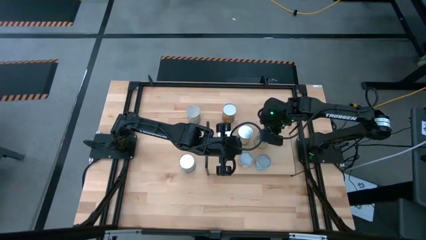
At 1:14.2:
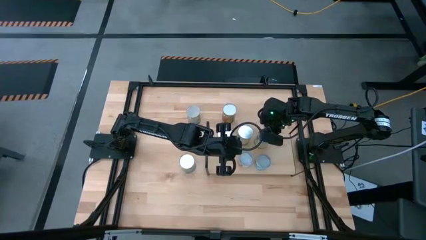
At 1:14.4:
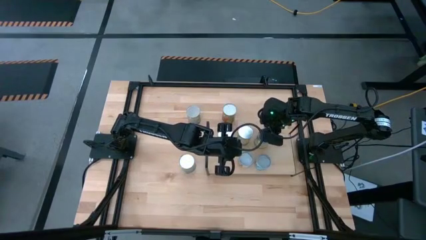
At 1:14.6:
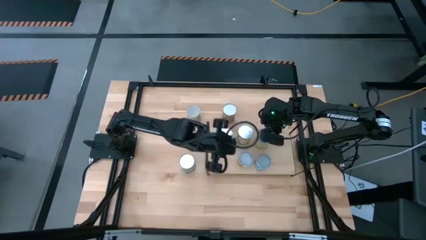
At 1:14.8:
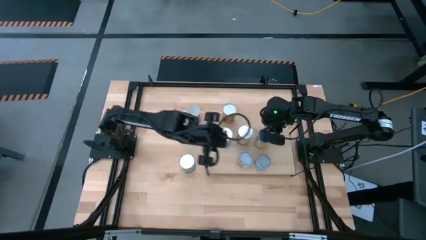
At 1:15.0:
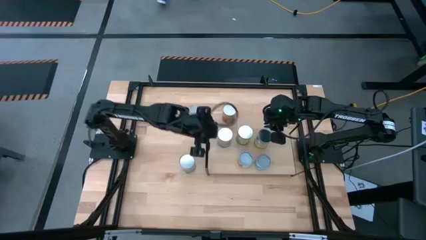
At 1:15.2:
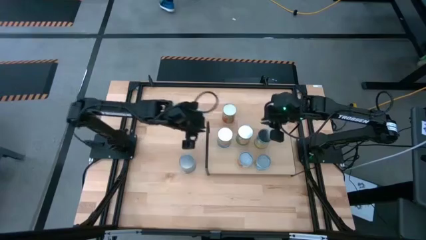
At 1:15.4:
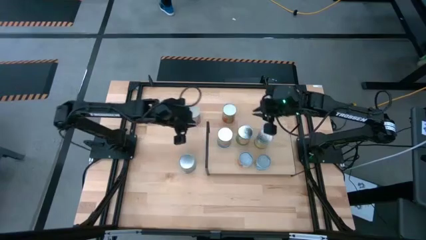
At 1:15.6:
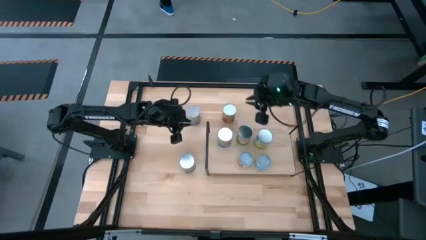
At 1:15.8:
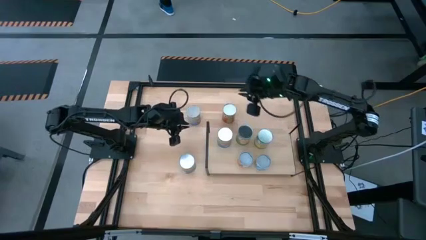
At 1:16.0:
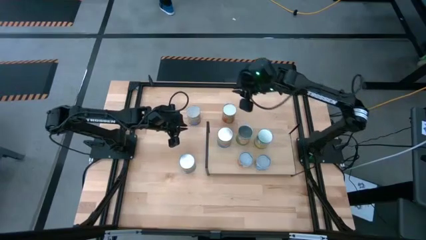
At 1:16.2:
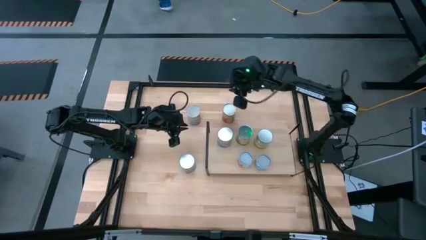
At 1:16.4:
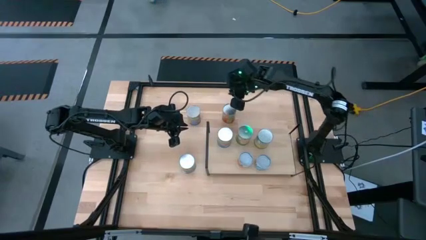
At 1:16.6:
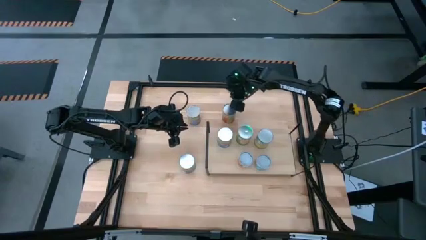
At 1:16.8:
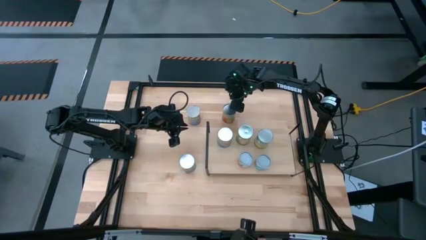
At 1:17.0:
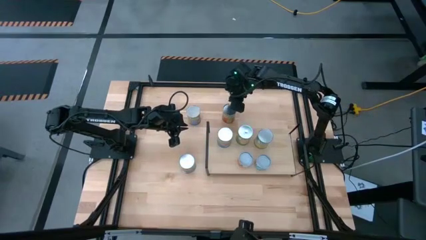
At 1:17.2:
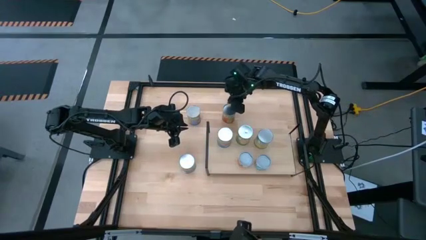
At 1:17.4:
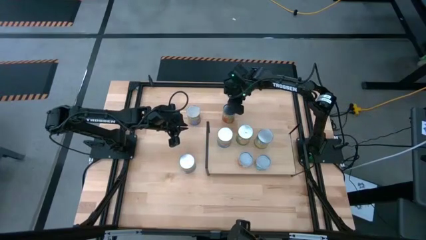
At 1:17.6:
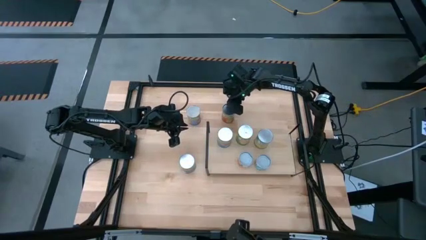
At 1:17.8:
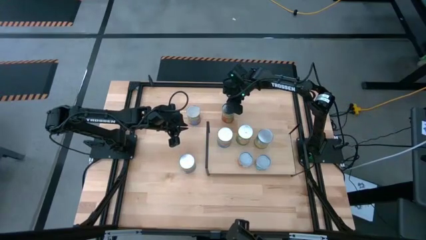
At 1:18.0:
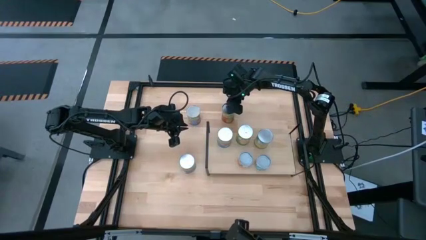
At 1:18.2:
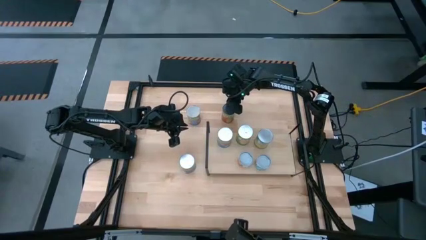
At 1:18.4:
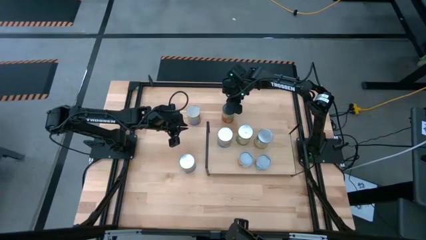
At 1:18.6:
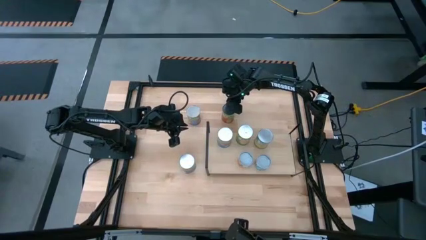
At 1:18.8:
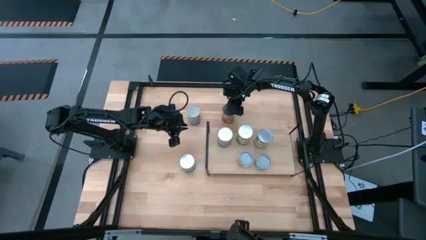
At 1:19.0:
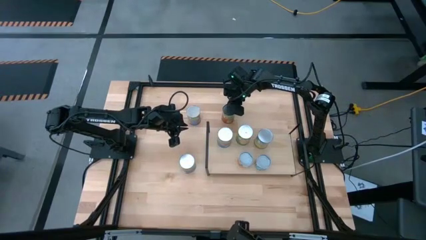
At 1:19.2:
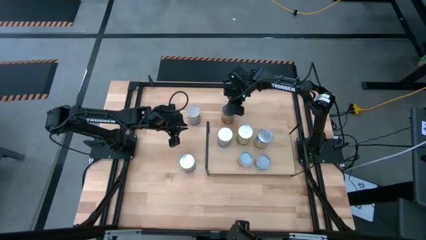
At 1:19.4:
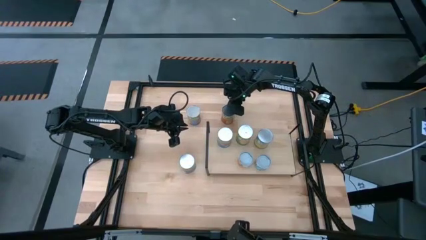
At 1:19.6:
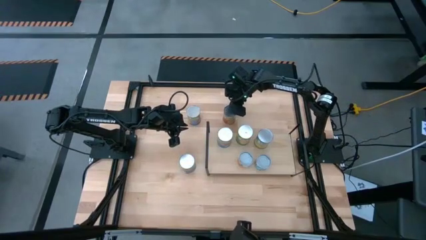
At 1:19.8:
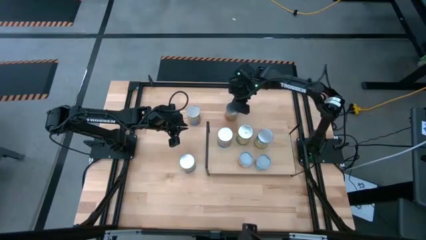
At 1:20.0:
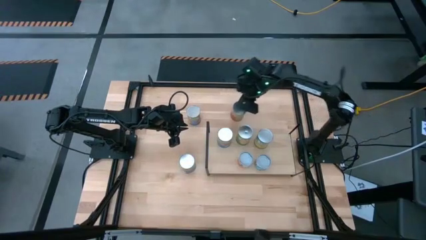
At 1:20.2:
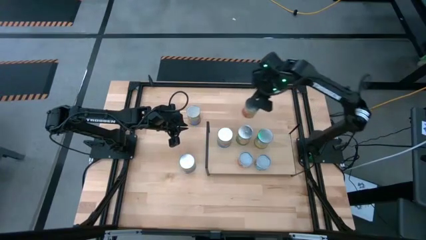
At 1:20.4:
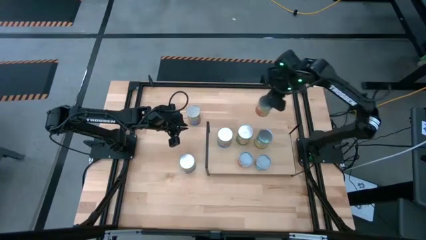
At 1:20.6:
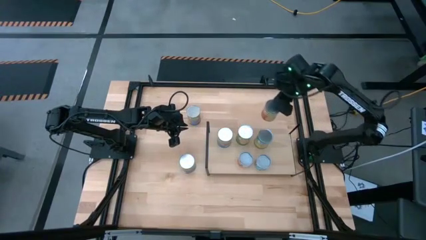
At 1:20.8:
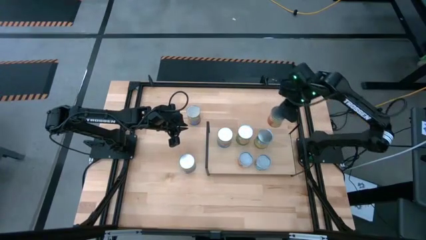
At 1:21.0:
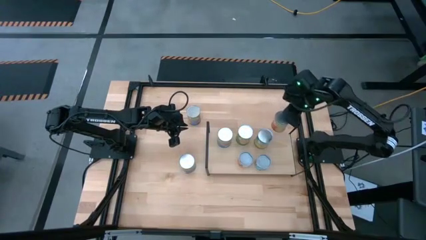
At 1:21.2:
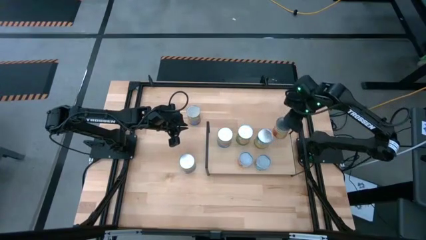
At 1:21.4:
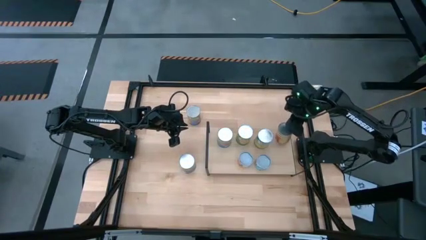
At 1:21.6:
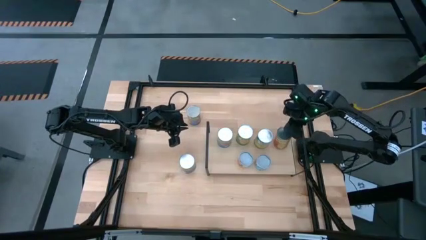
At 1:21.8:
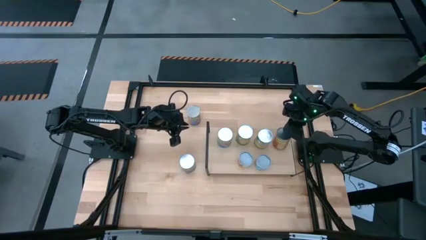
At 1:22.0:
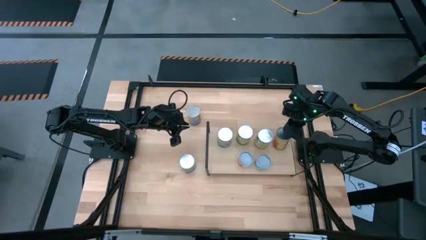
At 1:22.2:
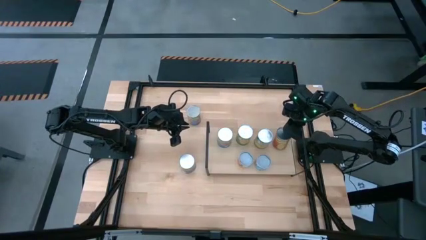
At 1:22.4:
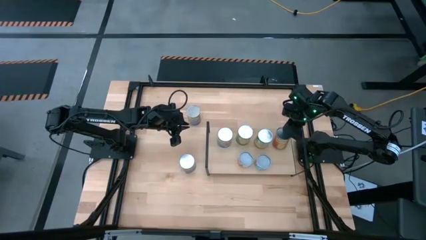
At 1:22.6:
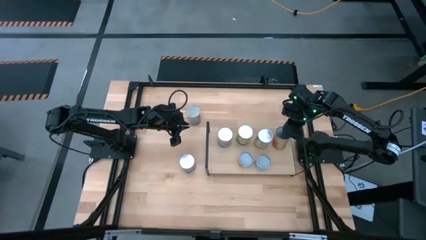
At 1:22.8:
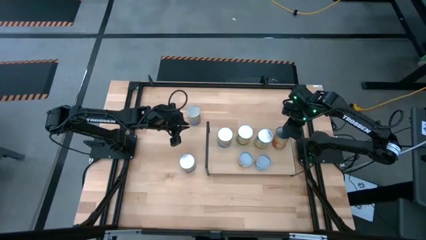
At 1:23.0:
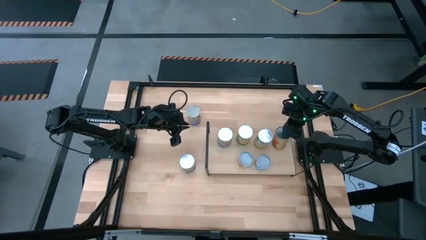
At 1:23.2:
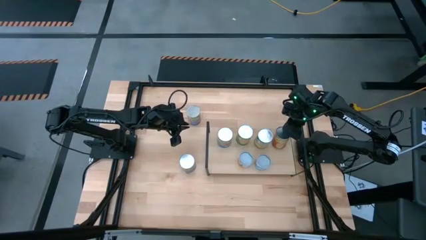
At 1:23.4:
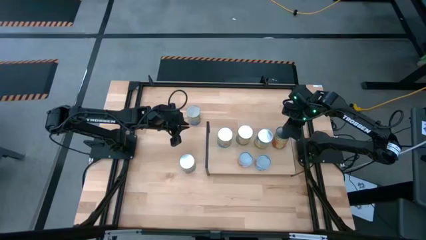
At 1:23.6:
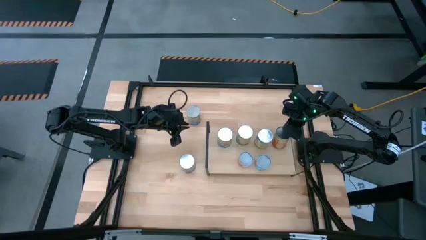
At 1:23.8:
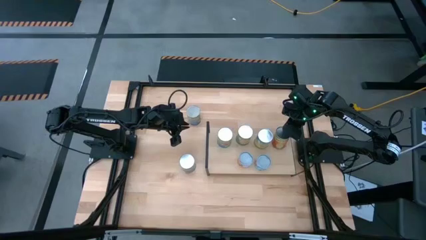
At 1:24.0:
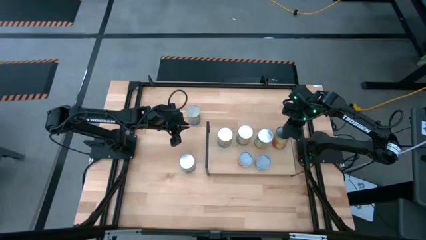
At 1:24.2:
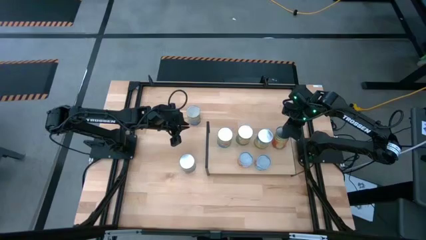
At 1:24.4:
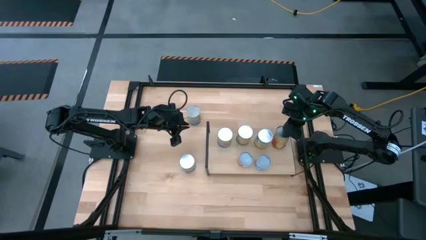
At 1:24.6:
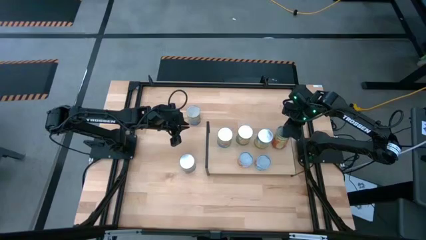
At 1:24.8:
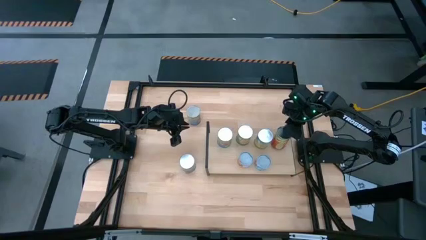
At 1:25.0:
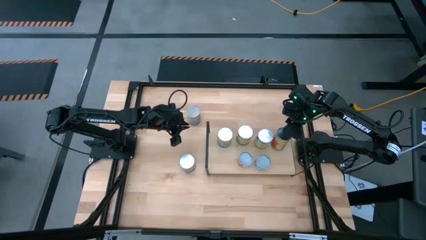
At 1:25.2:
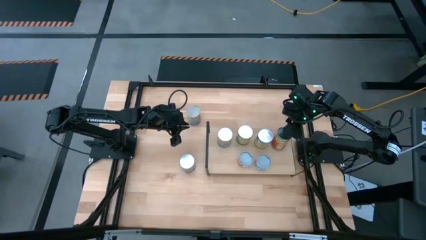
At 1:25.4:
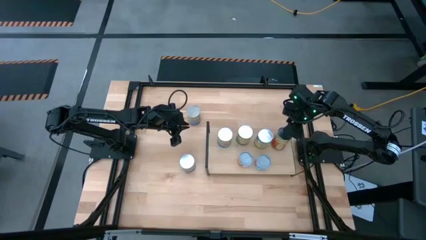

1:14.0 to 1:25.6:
Task: Pick and place cans onto a shelf
Put the canned pineapple on the shelf
